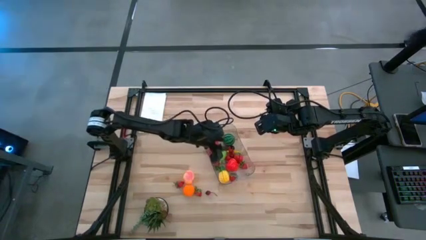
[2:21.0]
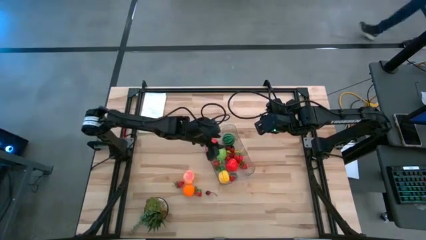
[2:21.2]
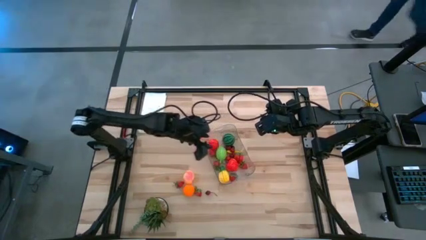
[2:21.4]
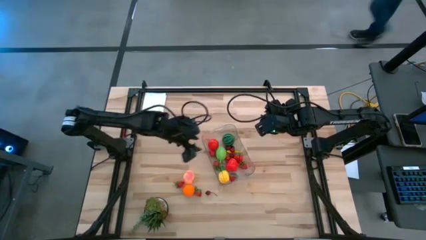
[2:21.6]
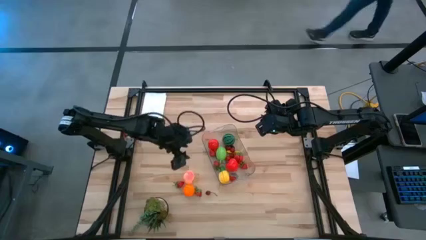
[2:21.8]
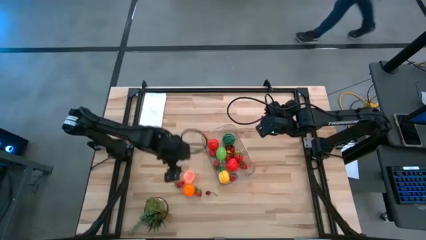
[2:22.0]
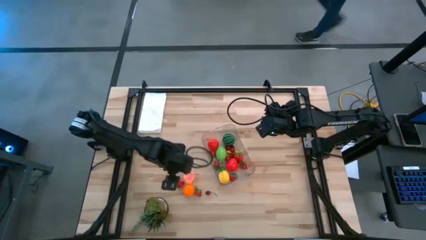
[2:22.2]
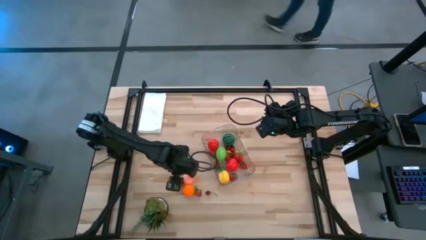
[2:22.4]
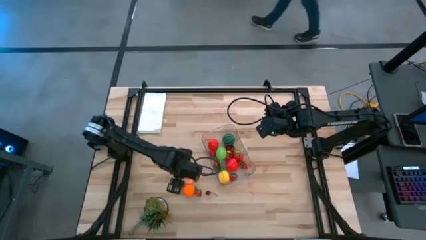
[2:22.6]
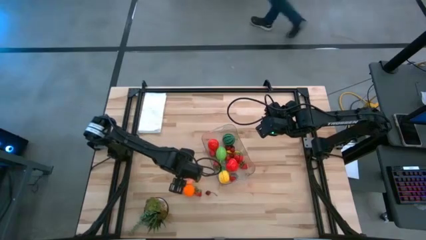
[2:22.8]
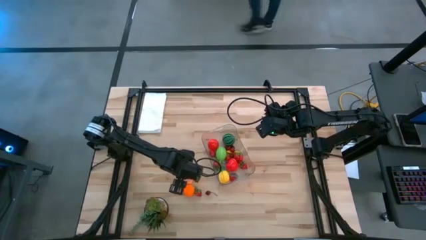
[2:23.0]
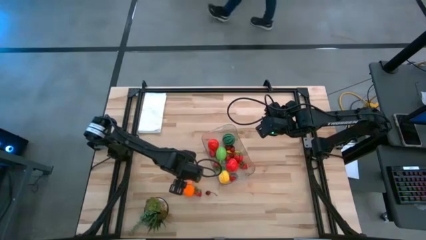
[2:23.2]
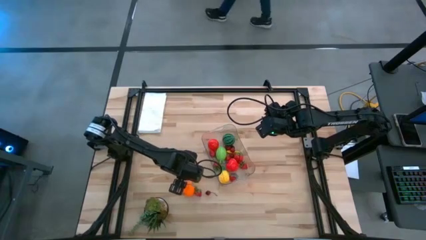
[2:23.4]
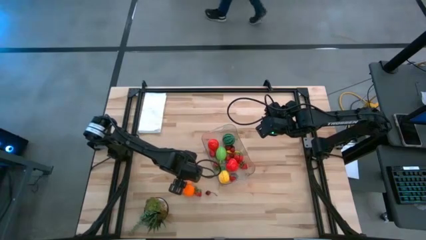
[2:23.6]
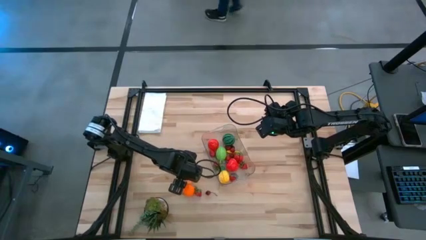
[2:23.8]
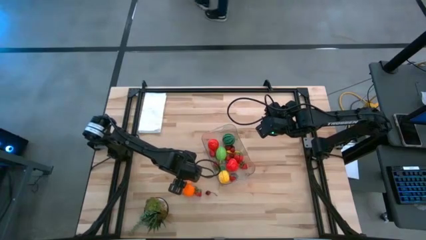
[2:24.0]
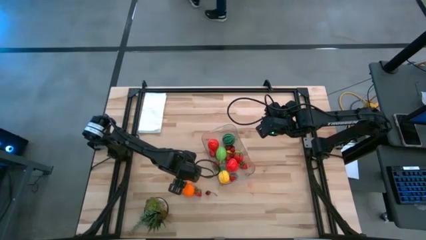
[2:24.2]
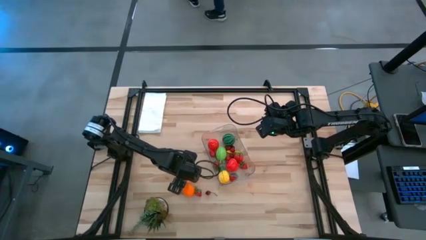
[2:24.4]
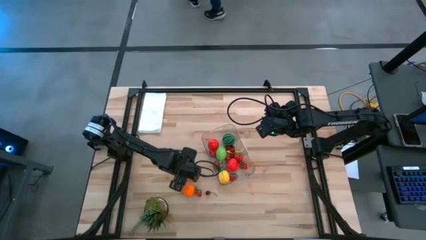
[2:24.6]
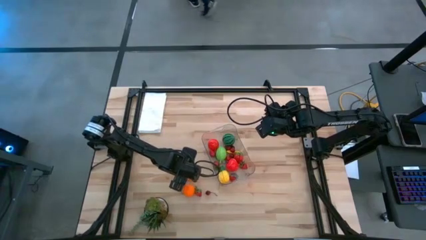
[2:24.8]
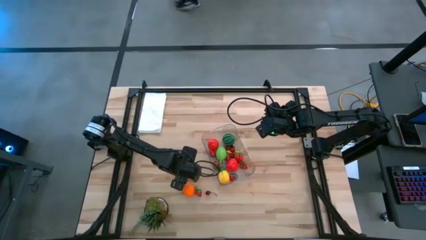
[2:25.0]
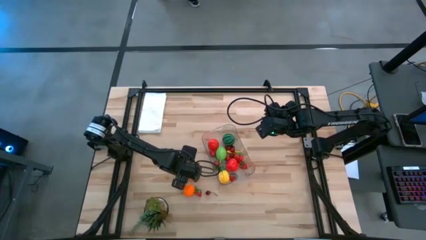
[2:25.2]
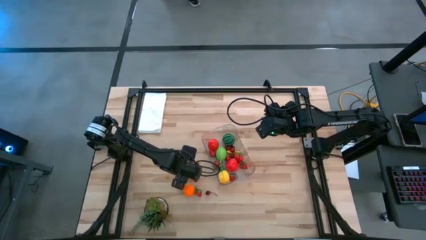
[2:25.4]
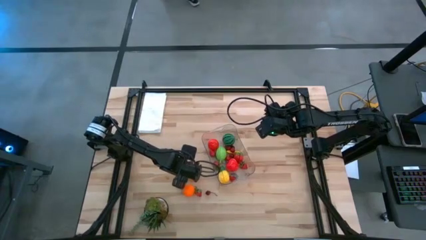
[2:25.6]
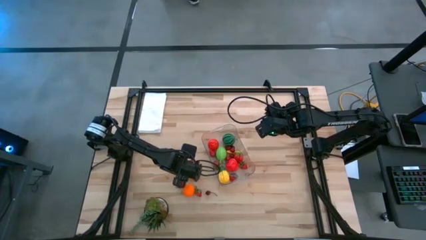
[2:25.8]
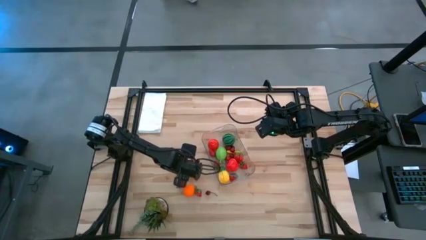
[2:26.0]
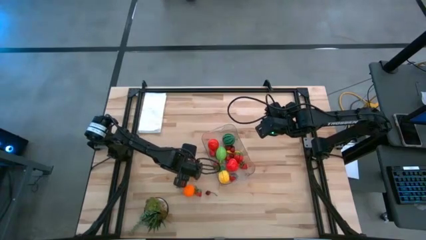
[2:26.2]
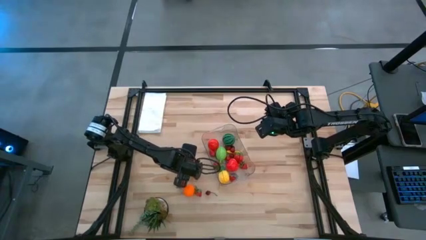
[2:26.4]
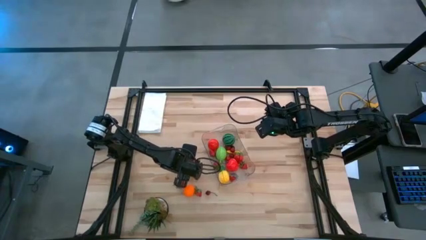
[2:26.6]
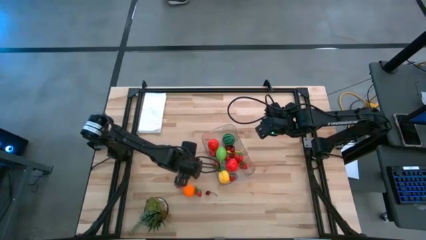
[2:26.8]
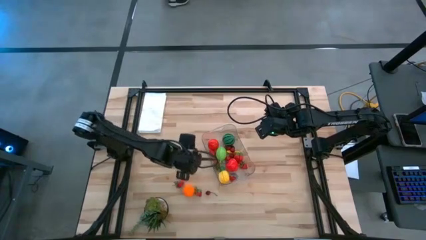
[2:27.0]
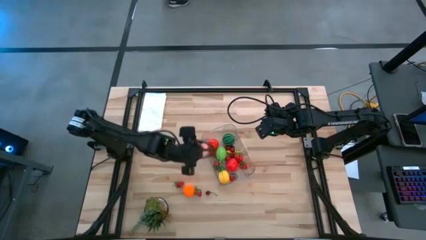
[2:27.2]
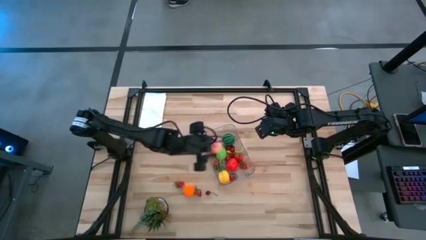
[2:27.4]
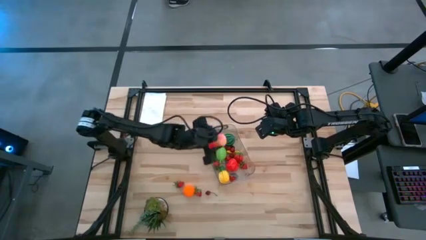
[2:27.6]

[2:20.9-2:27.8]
Task: Pick and placing Produce into tupperware
Put the peach into the transparent bin

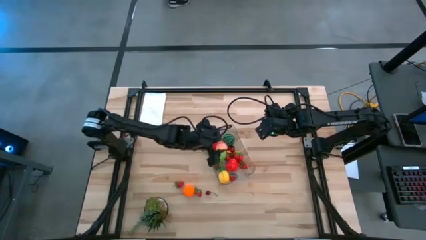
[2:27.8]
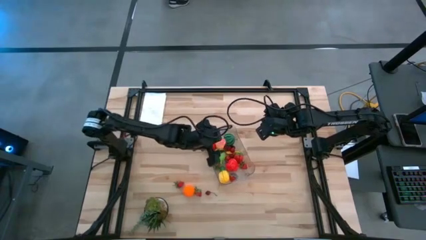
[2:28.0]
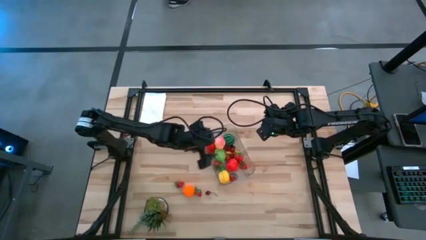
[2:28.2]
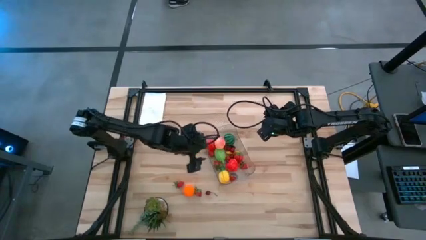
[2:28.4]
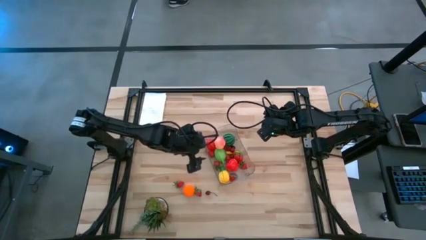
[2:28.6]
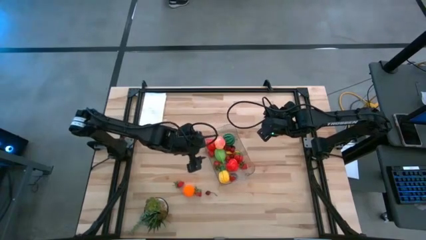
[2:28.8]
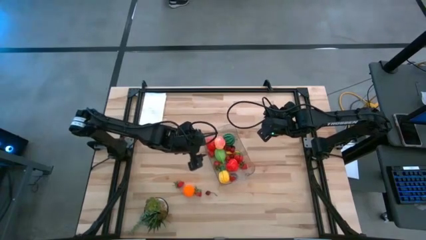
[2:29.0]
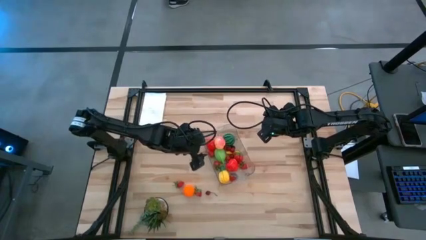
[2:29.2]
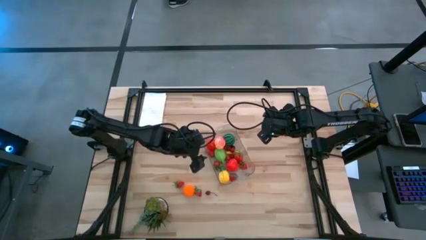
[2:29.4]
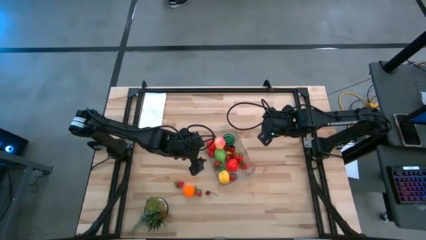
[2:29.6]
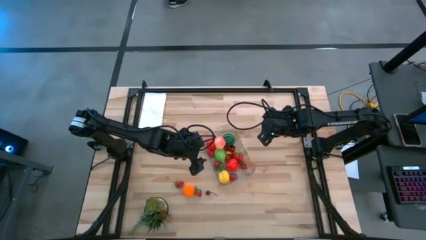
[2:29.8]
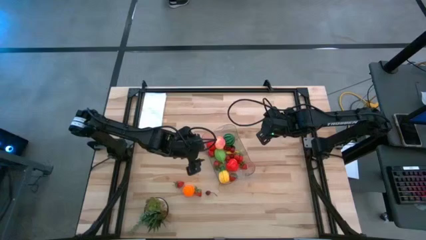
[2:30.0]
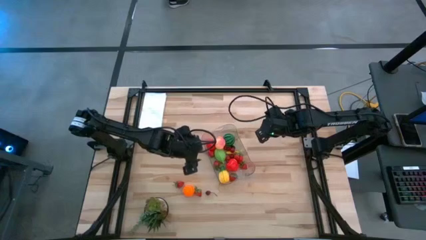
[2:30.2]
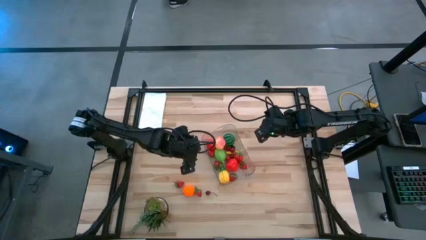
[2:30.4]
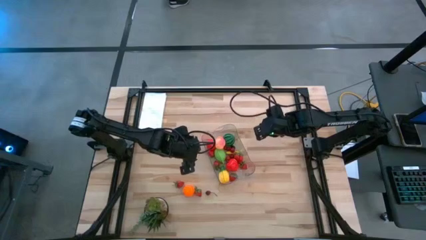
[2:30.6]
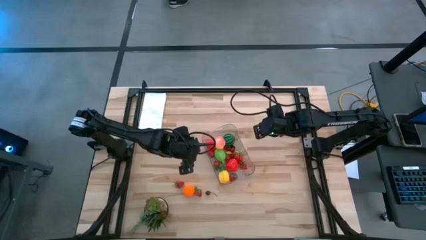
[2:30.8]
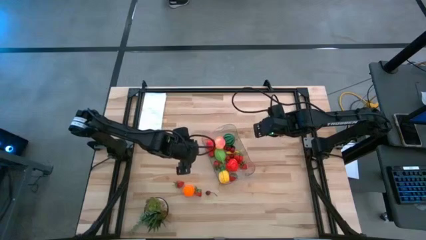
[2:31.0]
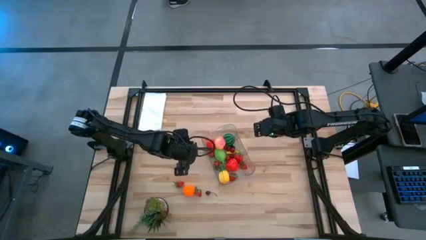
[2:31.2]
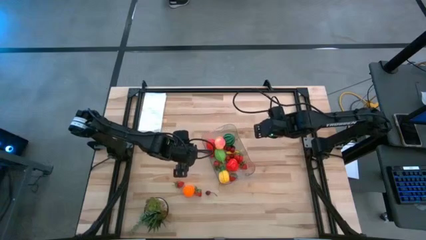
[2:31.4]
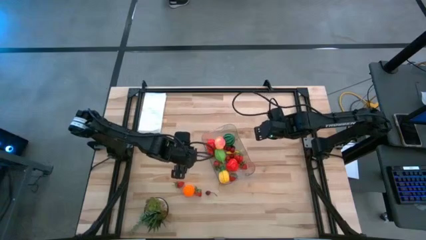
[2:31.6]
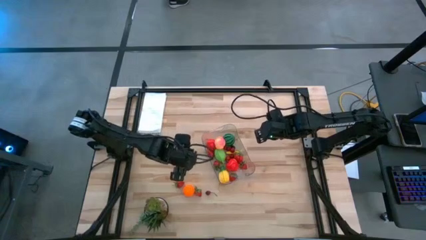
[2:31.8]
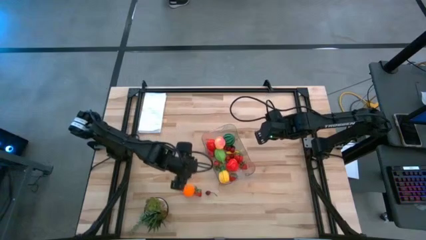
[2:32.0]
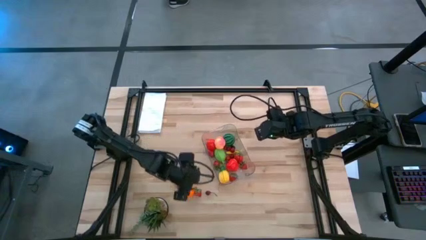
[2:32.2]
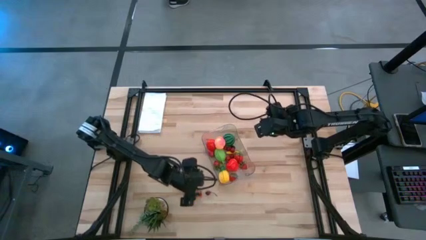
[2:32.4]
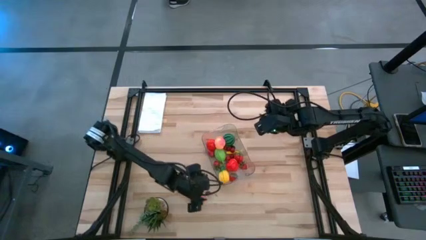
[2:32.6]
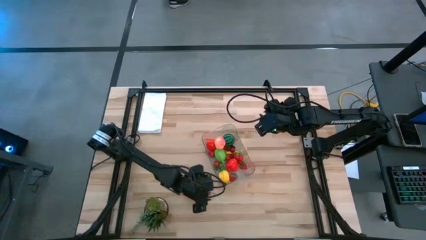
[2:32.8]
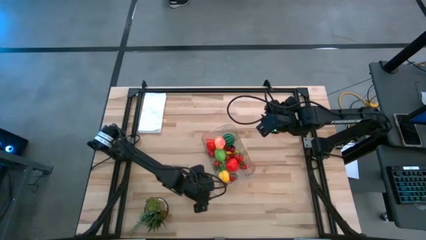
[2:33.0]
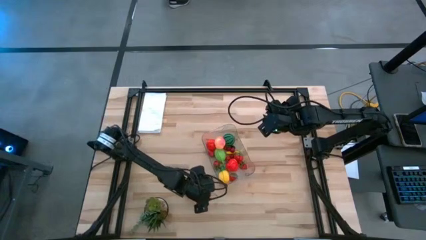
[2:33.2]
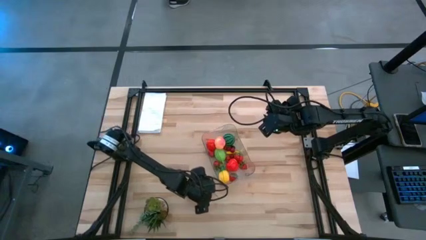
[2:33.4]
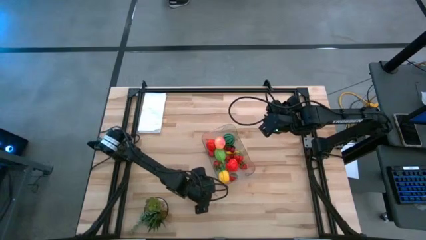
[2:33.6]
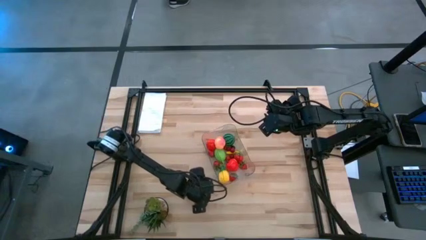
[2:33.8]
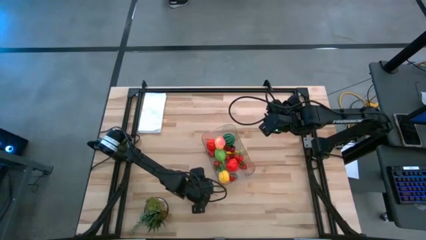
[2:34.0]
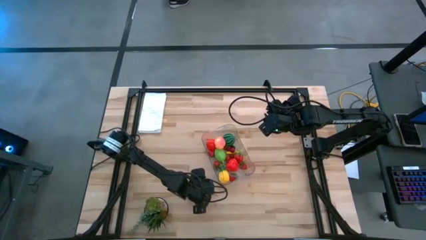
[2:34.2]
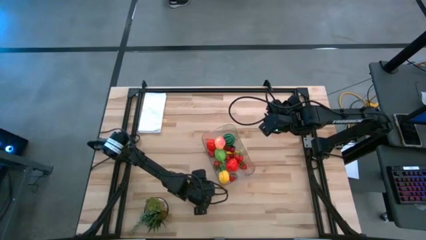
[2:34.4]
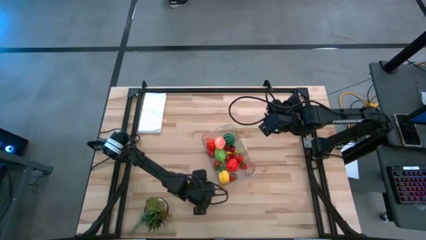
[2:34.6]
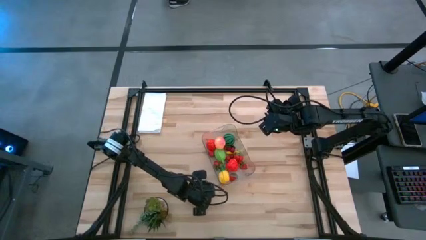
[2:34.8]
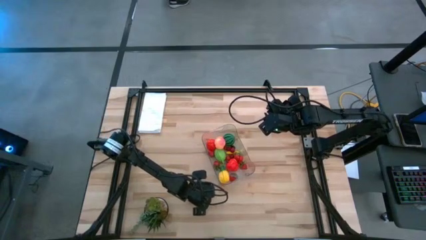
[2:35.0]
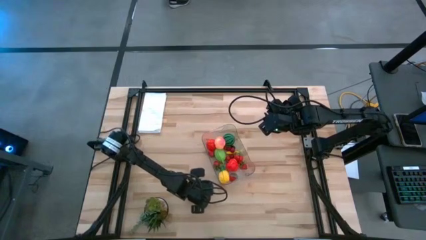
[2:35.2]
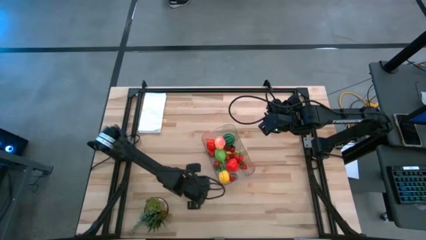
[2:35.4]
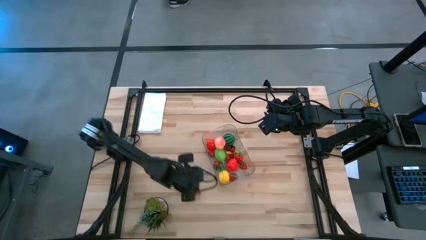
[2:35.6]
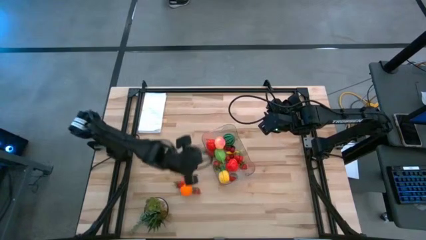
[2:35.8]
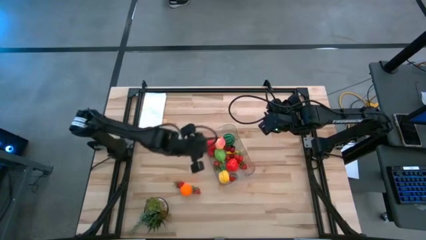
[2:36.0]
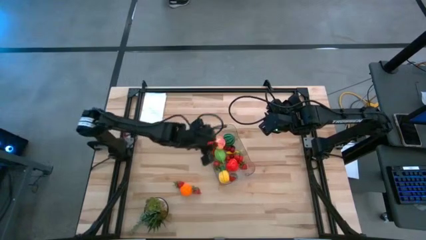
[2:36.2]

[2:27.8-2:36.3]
Put the red cherry into the transparent bin

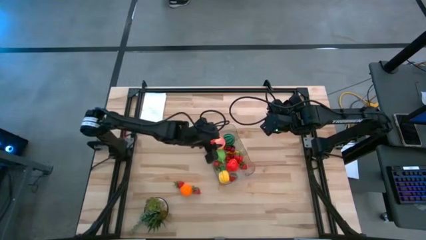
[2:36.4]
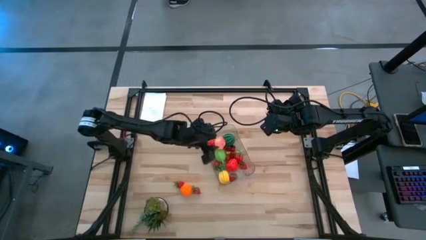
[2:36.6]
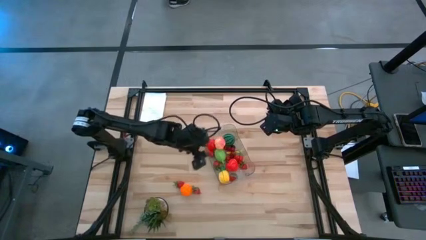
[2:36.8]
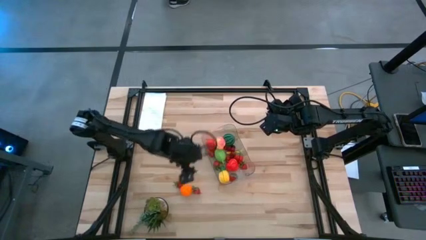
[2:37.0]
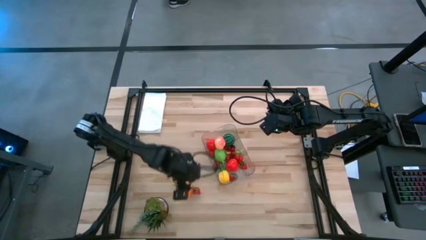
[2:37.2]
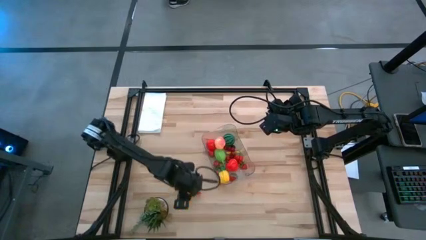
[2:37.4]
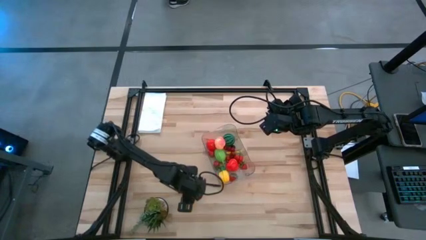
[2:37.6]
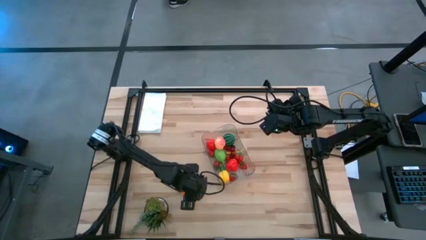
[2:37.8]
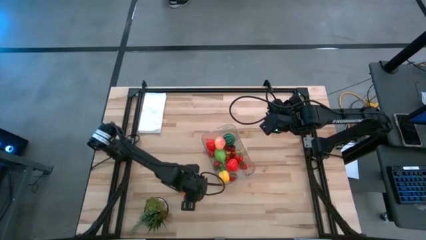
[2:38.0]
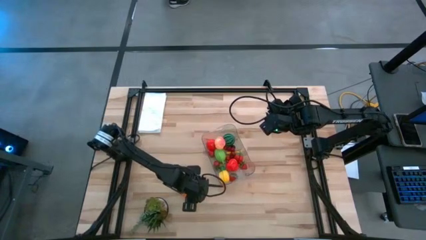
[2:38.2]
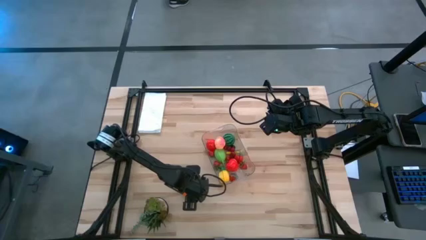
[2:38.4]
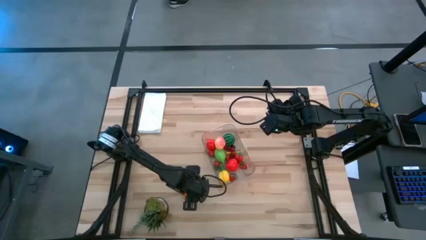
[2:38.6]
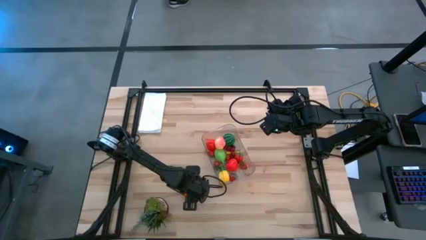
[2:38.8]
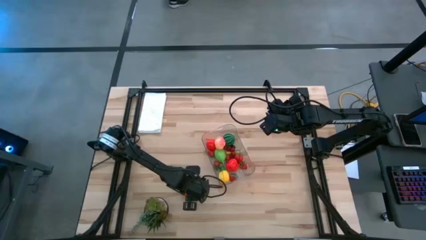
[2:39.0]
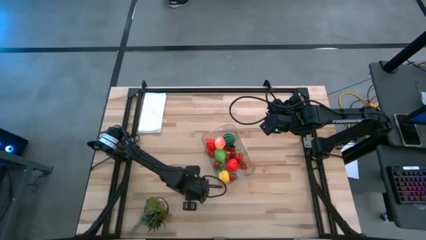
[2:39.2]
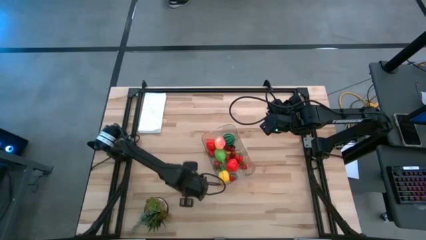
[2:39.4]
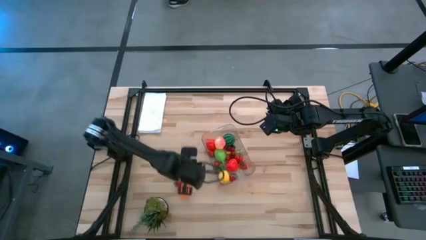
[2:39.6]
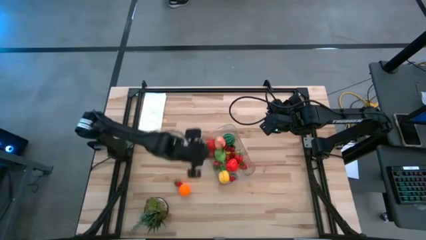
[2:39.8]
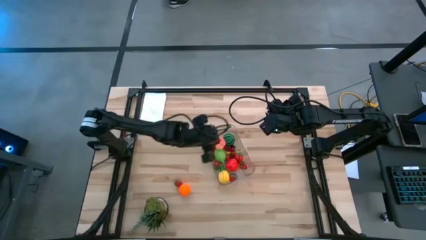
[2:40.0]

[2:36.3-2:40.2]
Put the strawberry into the transparent bin
